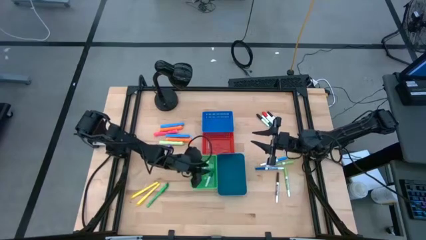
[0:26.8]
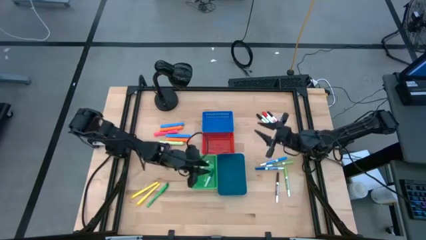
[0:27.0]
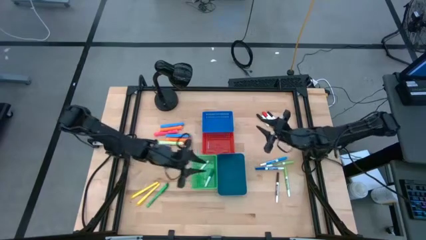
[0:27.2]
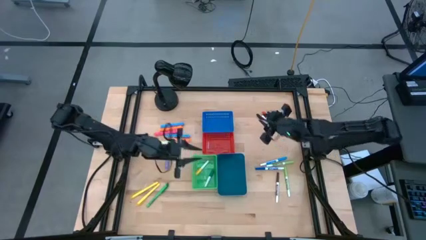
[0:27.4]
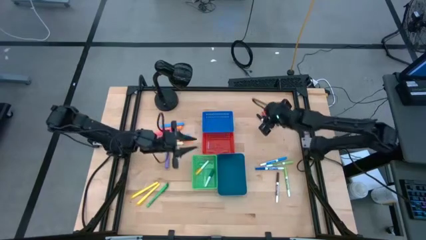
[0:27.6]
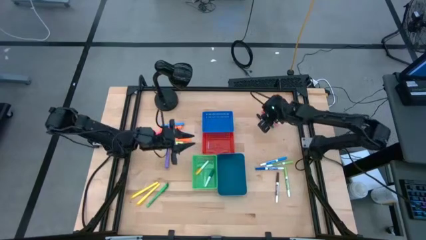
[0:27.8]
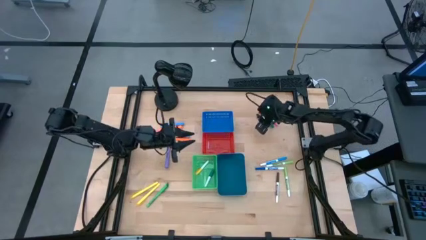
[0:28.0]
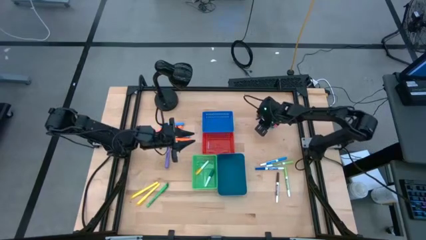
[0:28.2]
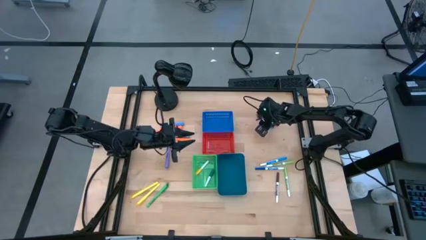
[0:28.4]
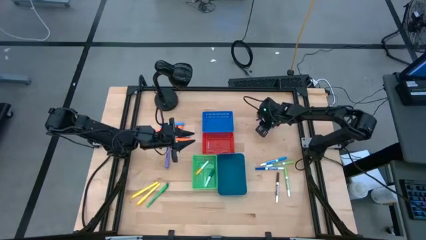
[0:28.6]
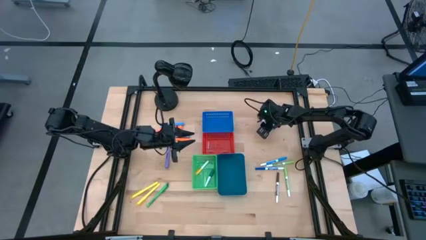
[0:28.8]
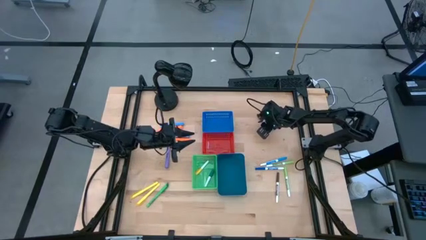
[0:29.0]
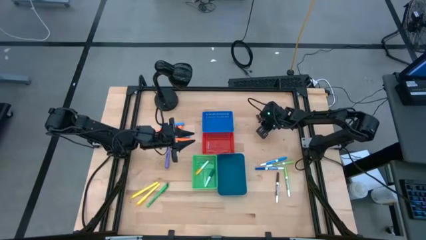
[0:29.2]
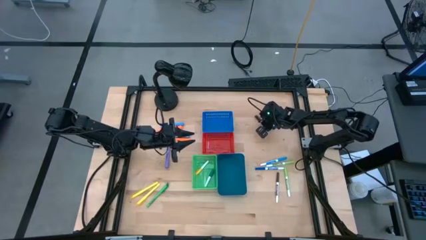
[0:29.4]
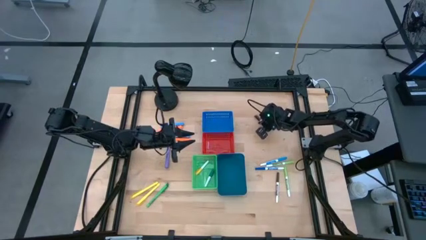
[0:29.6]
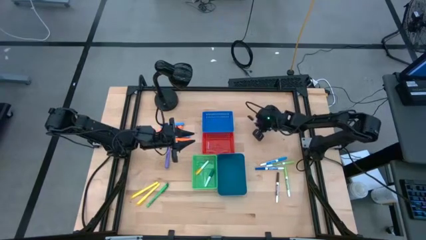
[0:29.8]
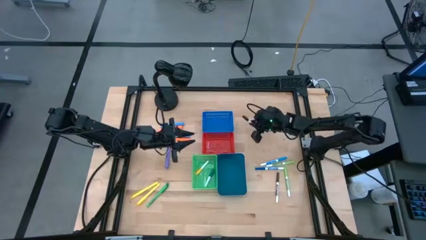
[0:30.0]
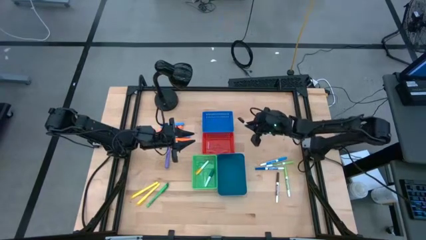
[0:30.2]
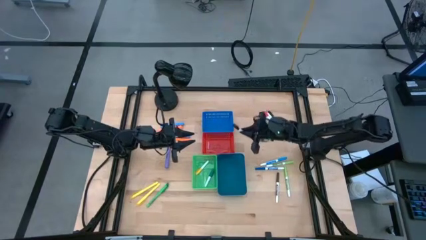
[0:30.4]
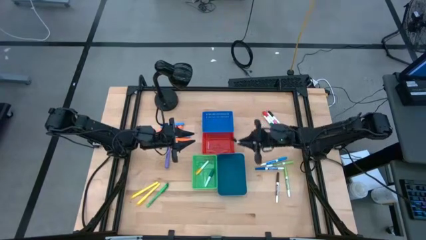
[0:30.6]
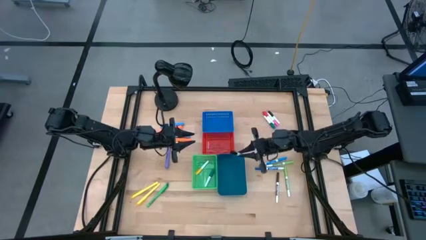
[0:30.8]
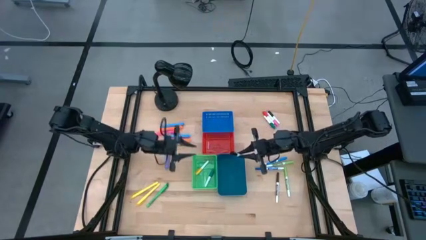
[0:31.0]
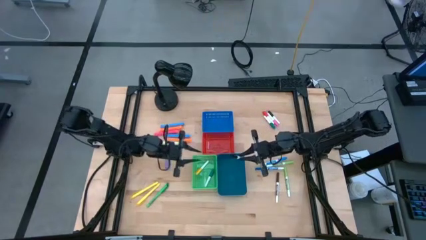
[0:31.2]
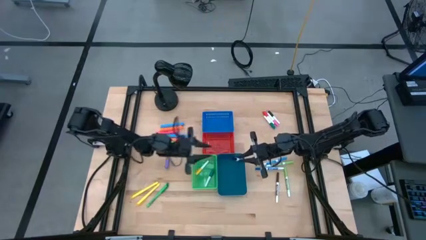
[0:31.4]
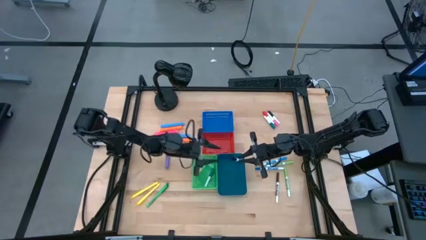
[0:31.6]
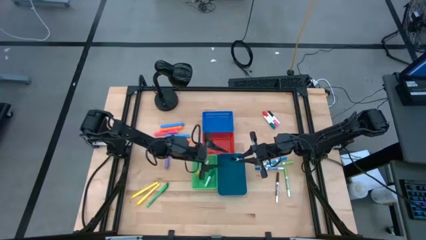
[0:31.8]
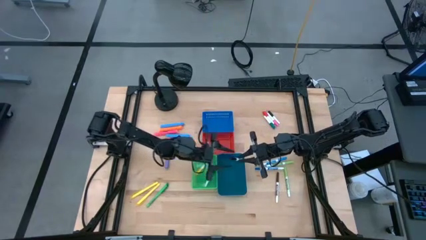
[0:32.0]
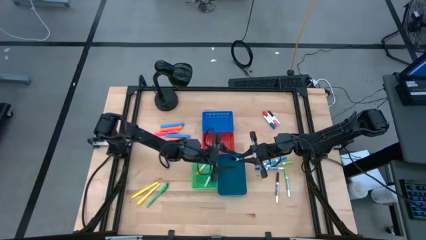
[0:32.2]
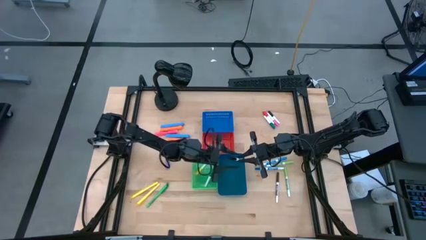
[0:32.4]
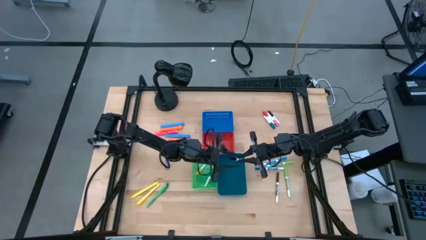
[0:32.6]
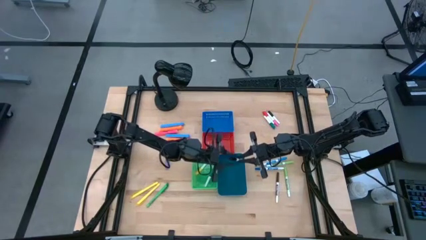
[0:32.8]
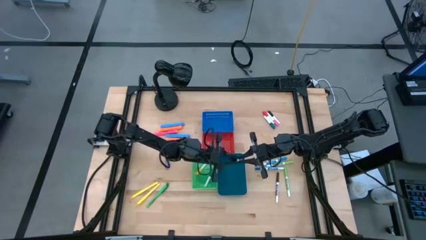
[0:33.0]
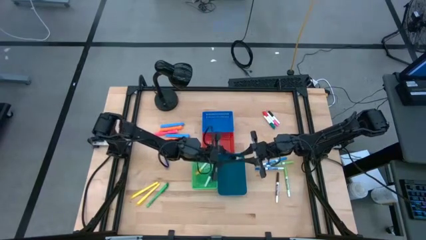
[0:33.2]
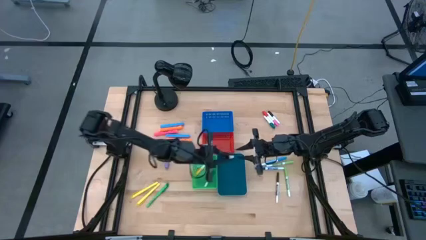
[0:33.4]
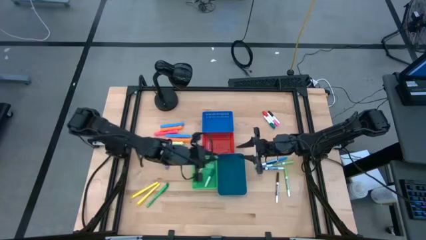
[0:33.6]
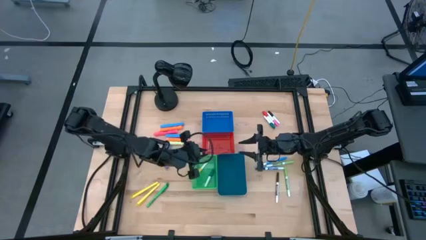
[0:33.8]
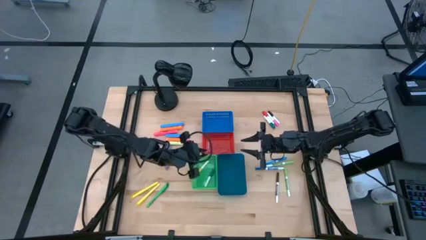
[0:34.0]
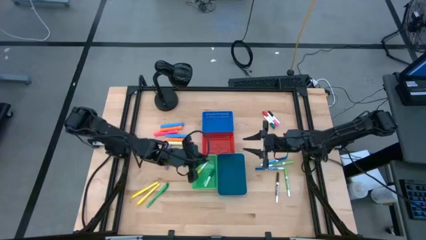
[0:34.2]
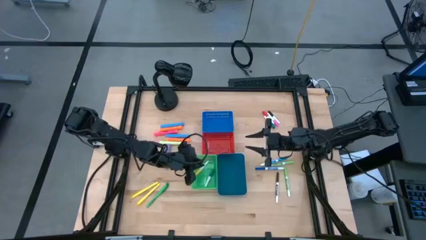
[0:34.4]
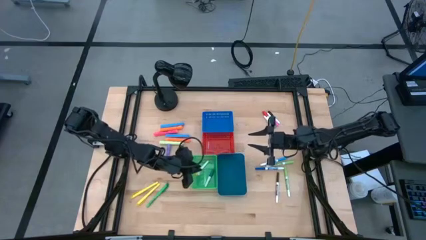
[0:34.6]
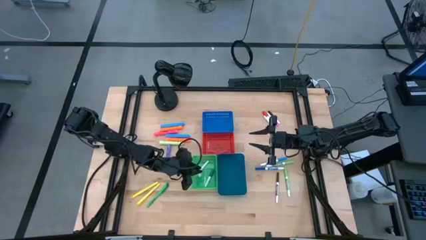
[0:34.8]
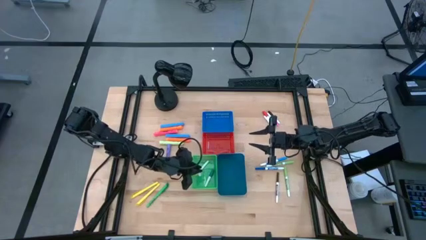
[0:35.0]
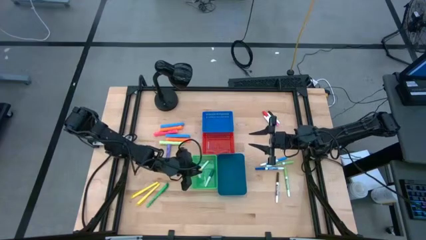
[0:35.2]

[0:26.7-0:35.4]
Task: Pick & Place Markers
Put the left small black highlighter pen into the green bin

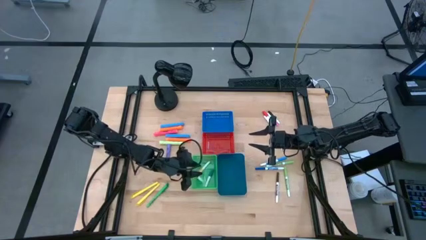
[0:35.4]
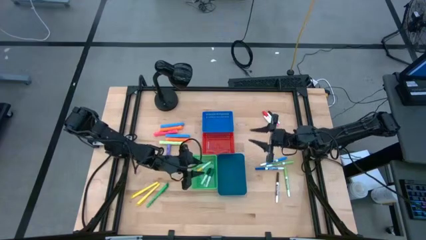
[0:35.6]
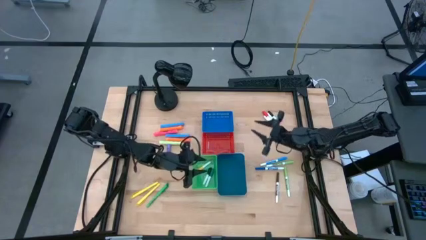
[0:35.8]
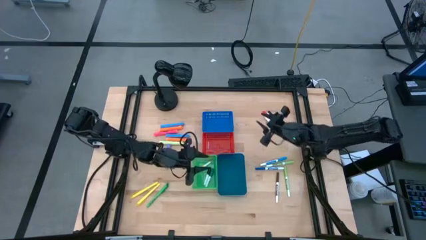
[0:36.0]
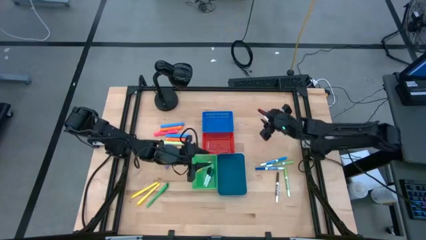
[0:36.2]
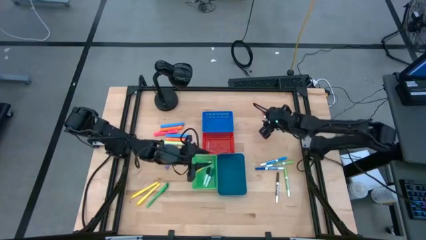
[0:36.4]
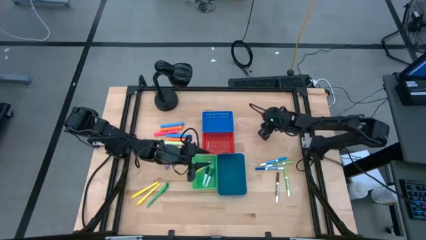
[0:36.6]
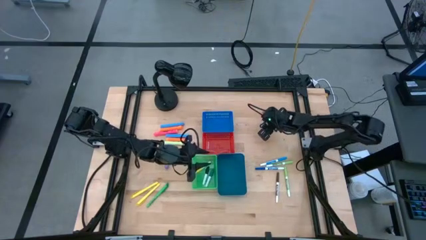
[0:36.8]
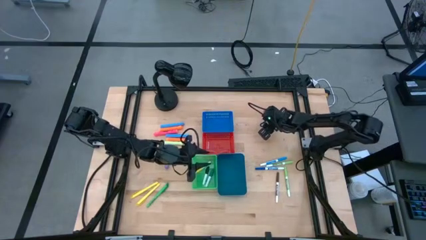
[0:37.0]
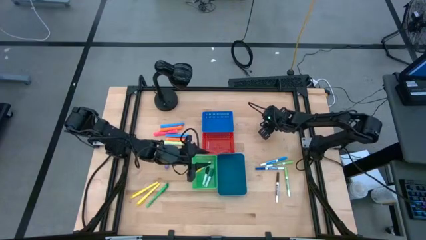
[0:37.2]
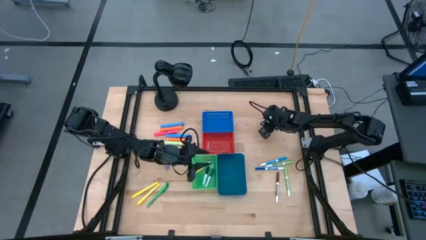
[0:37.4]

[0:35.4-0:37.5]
Put the small green highlighter pen into the green bin

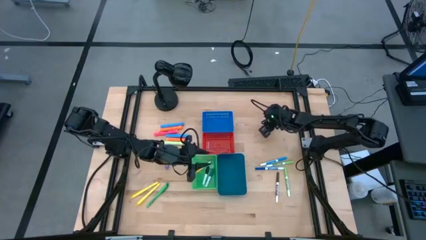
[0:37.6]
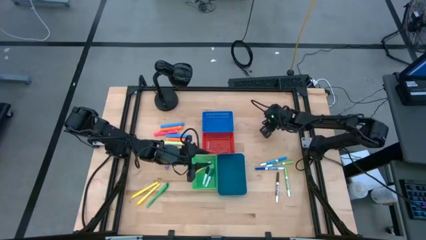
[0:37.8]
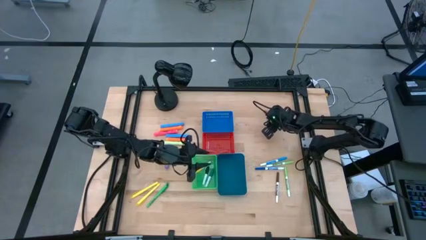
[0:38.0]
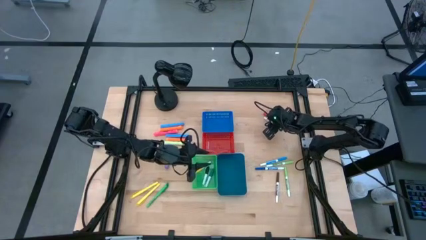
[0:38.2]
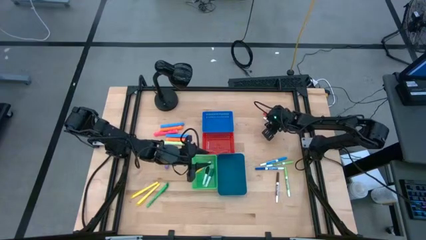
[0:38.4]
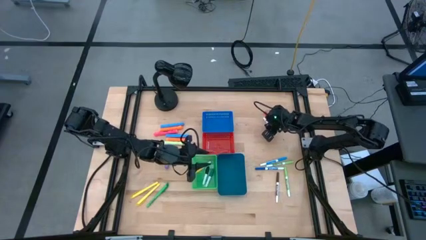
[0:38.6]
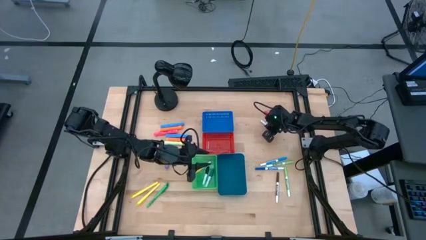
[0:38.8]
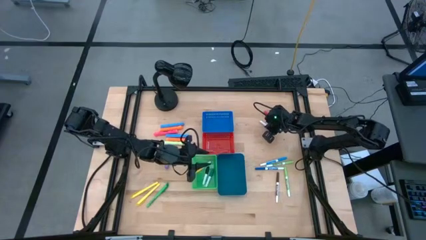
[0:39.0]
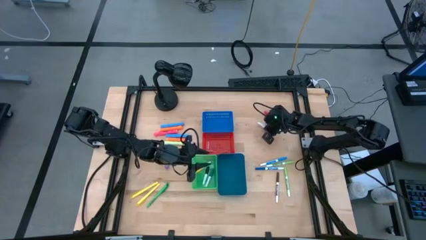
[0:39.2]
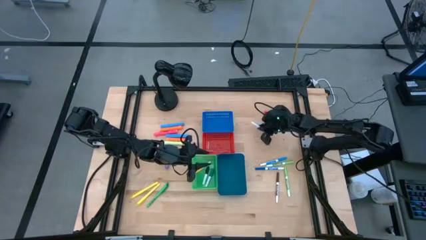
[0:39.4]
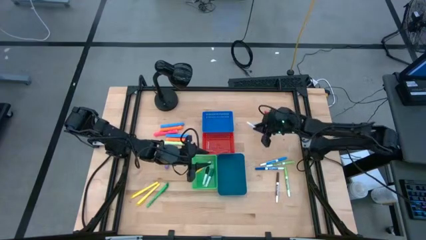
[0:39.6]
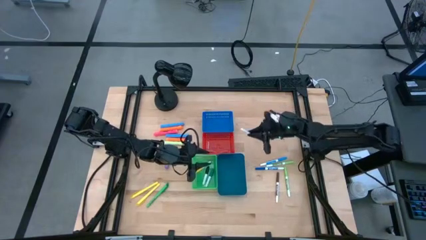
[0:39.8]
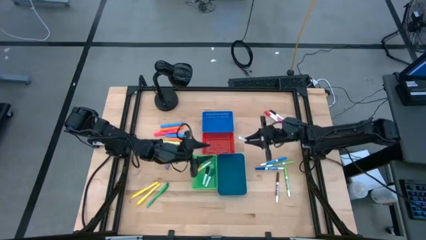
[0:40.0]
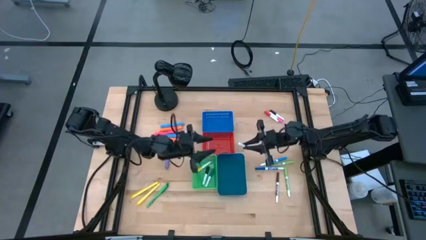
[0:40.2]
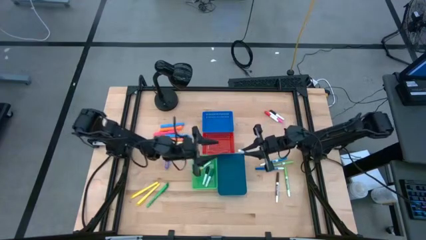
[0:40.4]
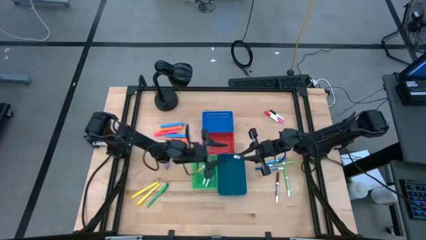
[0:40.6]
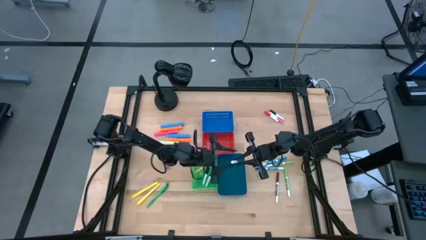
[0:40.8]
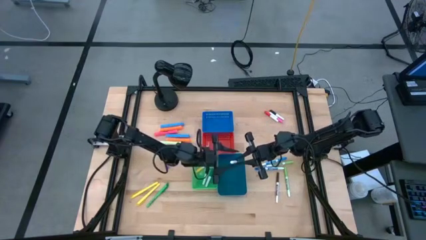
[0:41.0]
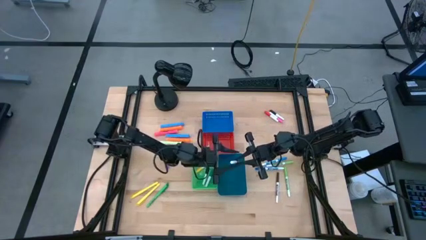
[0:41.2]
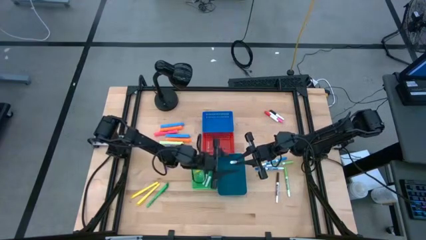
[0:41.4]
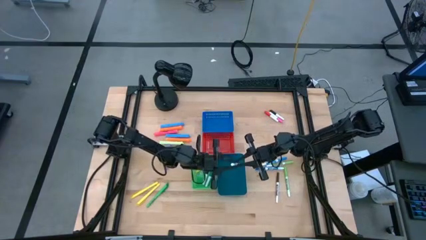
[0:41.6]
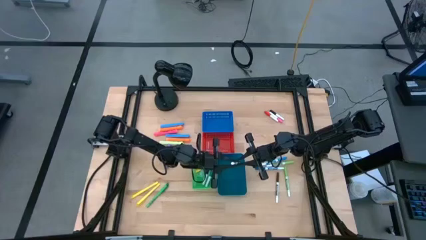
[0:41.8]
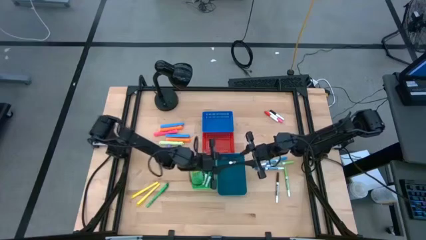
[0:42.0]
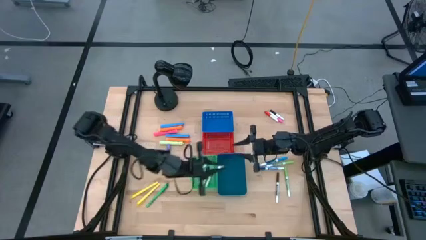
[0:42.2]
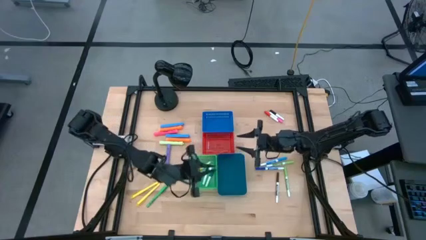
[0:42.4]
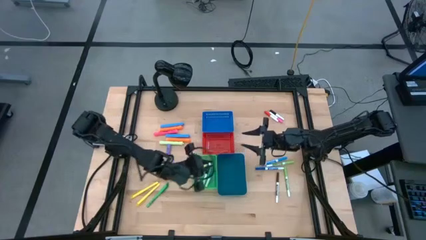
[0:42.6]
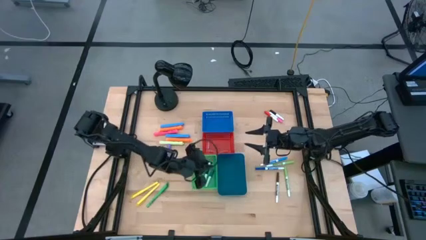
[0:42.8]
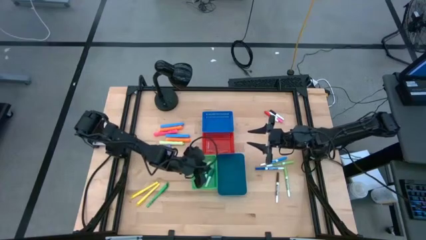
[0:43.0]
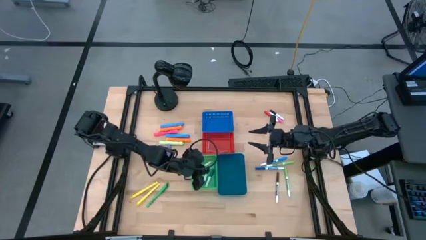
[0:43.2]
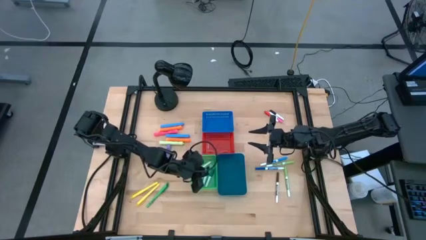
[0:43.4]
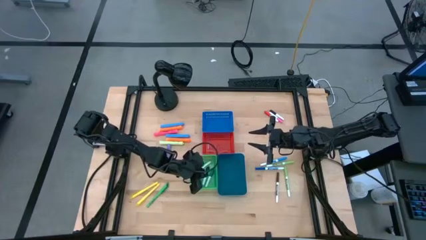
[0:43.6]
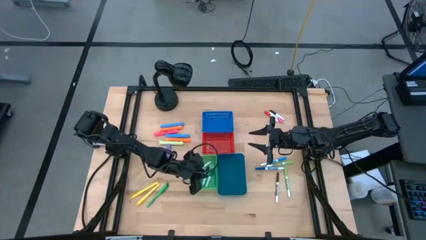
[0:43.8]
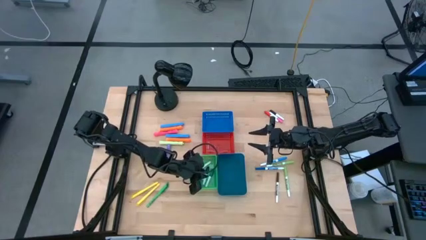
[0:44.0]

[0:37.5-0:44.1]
Put the small green highlighter pen into the green bin
